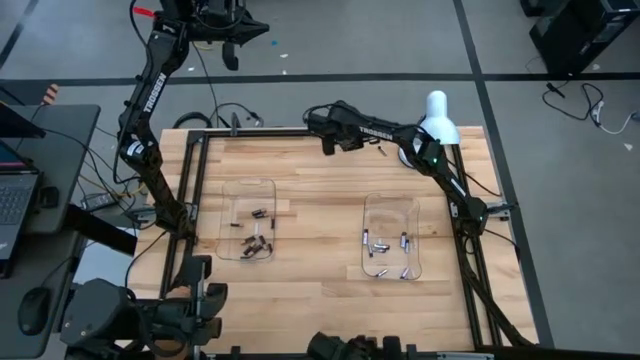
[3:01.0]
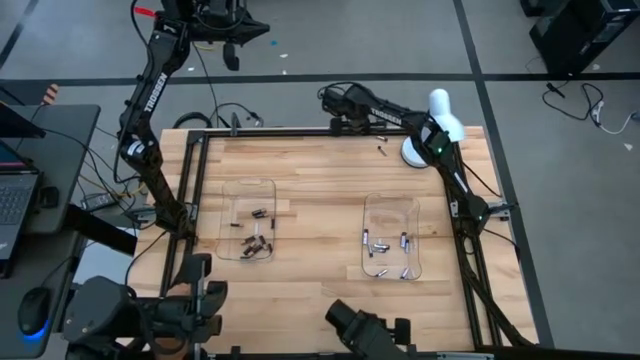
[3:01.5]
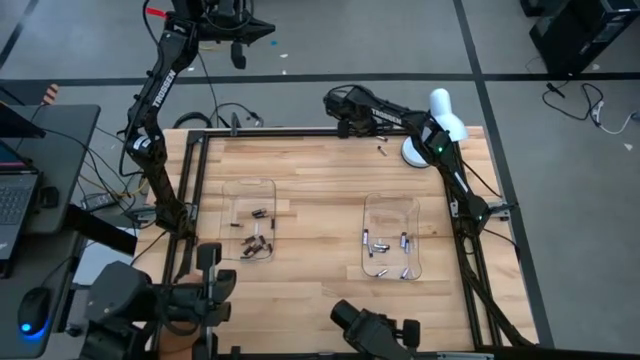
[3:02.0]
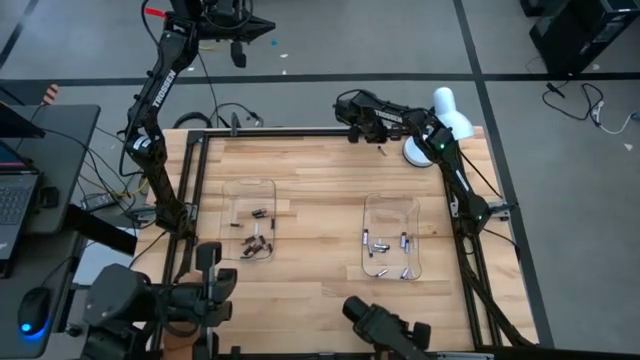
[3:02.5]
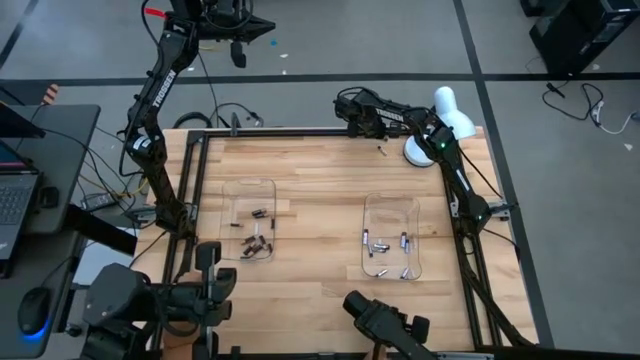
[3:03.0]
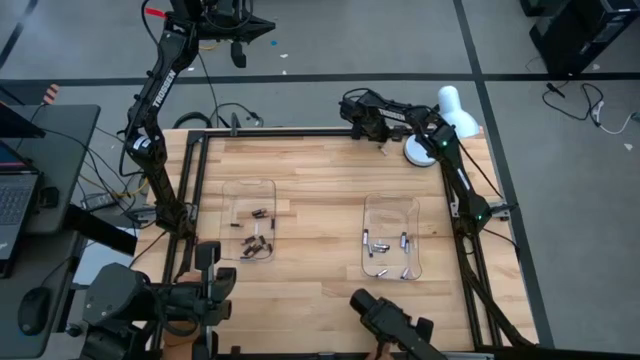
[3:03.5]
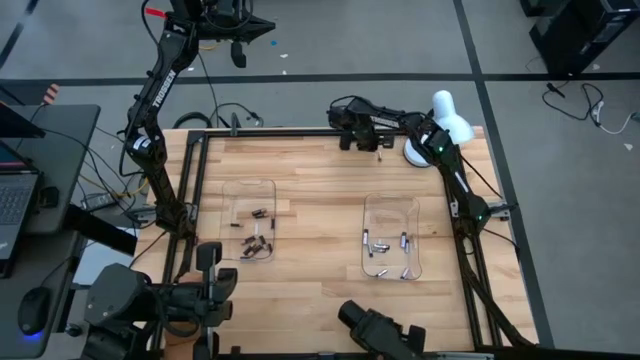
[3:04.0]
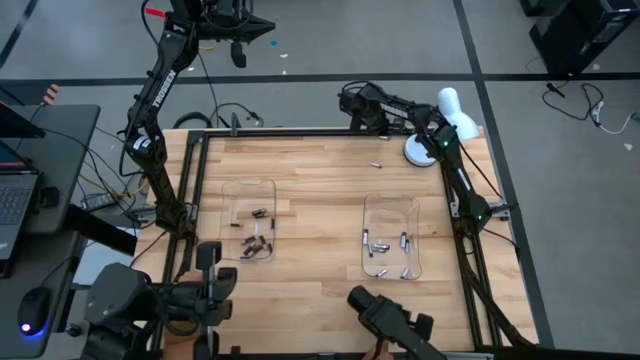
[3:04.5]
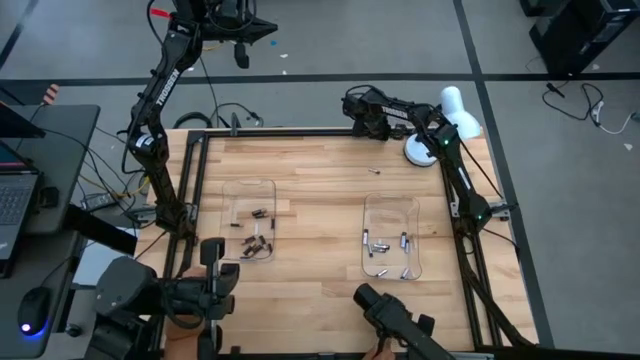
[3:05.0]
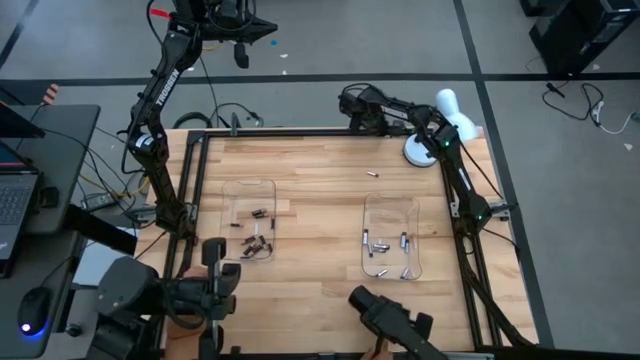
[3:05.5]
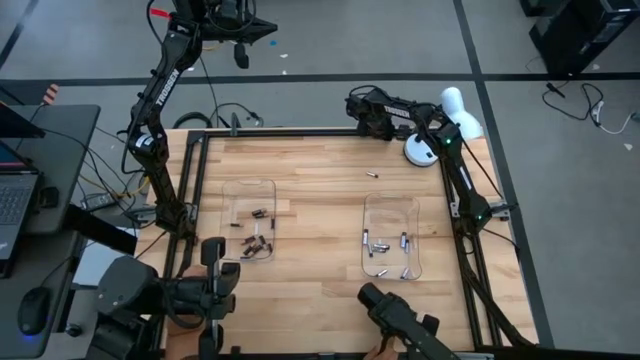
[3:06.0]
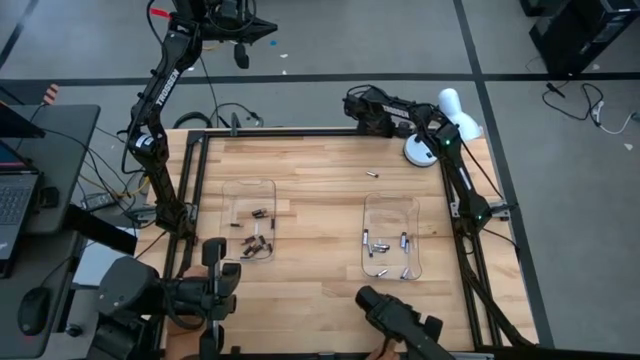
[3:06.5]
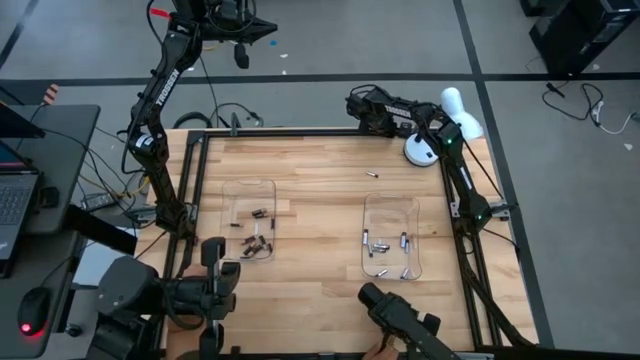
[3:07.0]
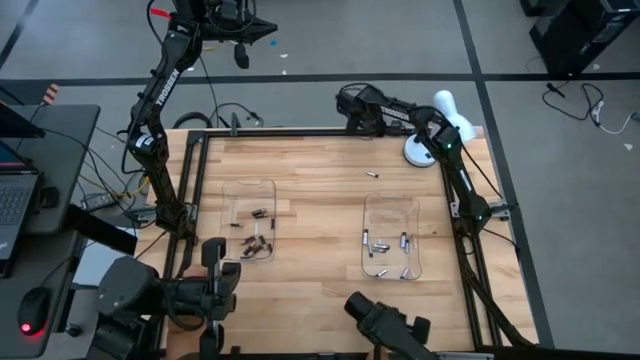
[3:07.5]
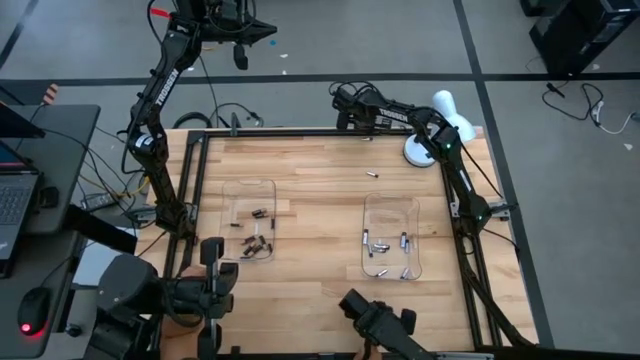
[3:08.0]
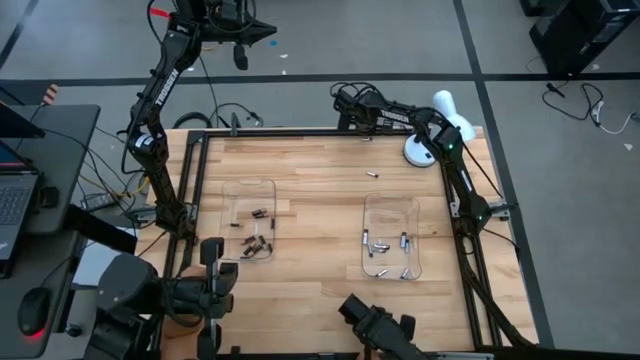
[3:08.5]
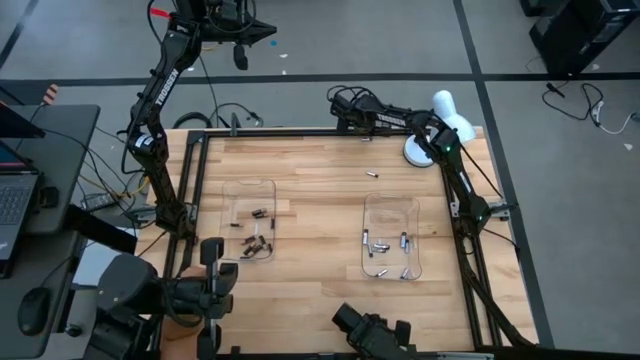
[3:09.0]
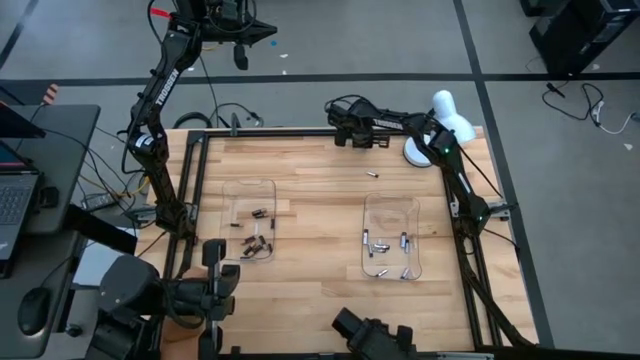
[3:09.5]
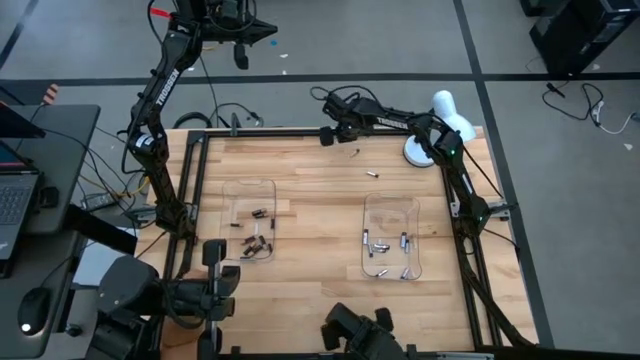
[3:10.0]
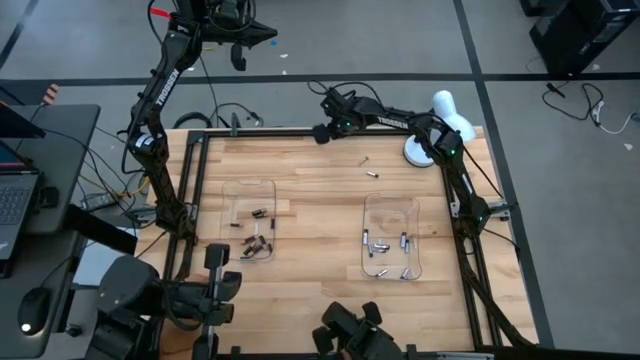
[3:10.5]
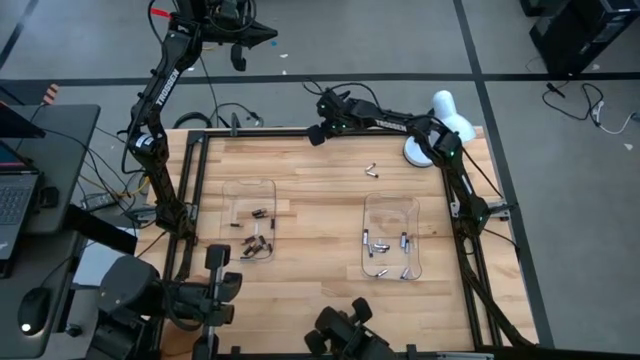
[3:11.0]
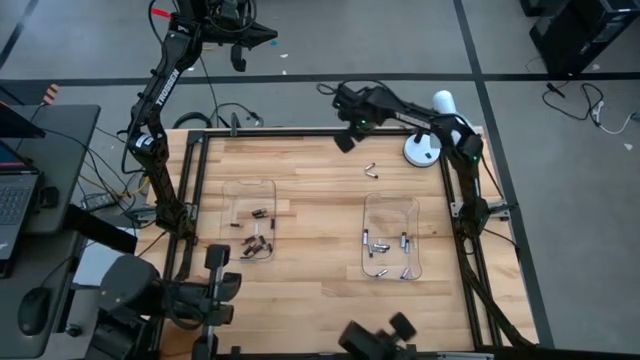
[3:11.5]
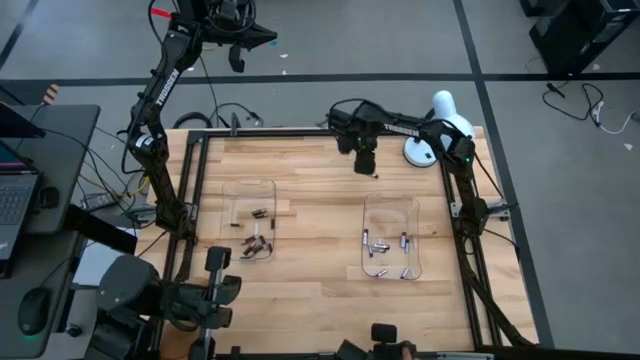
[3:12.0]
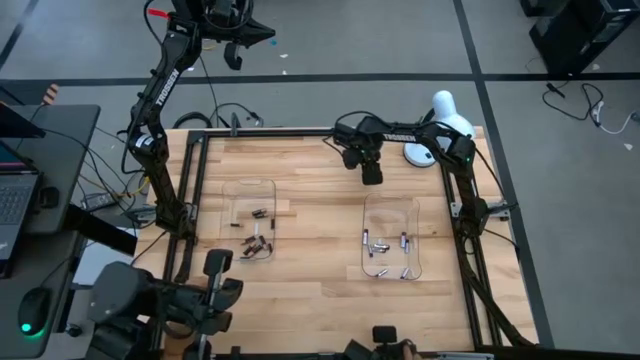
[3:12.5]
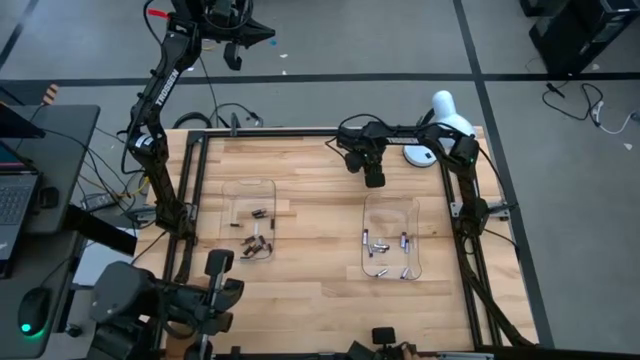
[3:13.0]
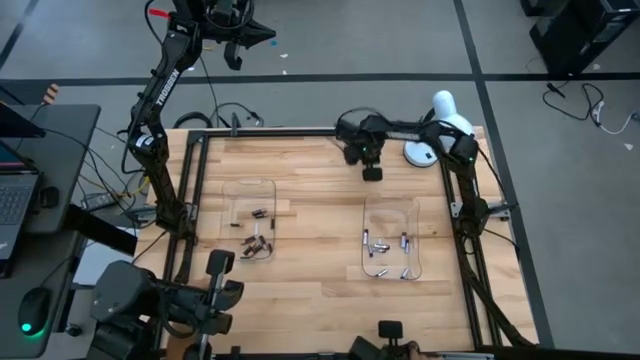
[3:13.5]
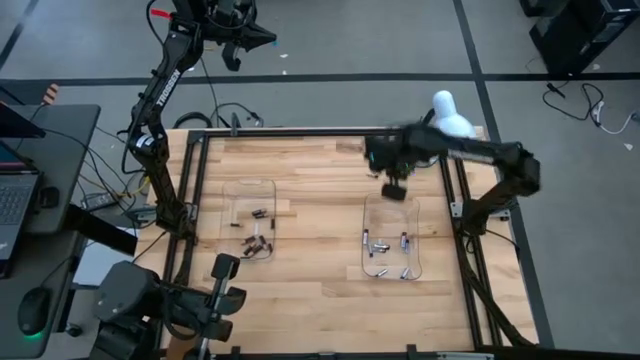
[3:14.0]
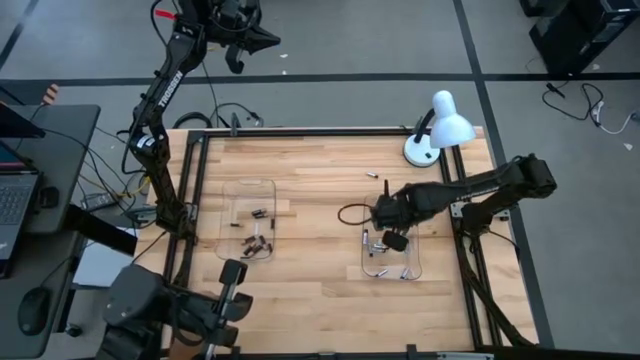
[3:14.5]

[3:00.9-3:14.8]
Task: Sort batteries
Put the silver battery into the right transparent bin

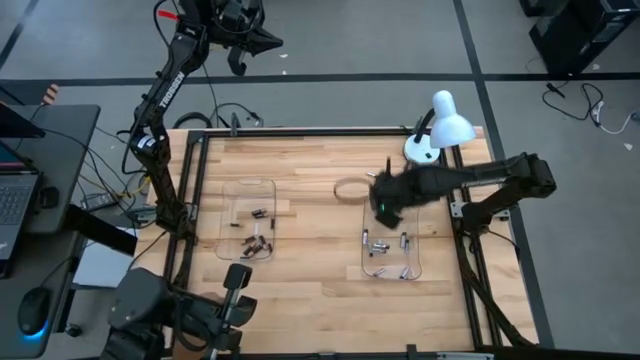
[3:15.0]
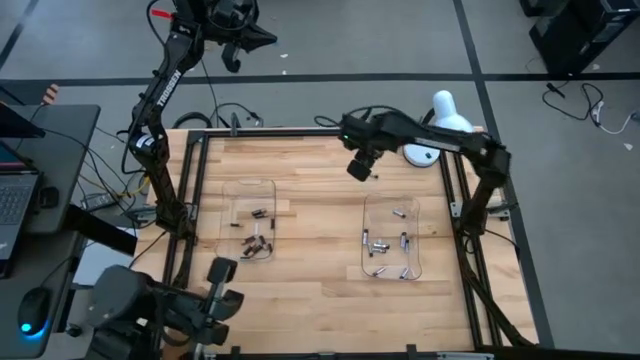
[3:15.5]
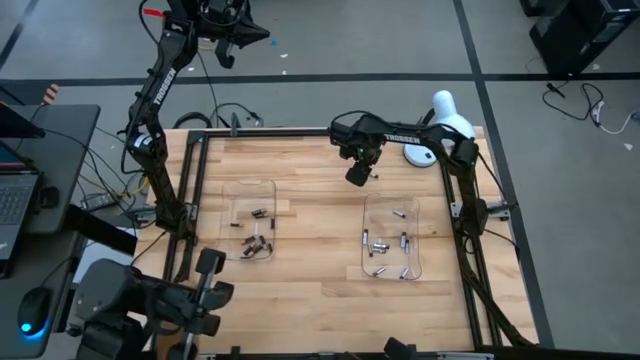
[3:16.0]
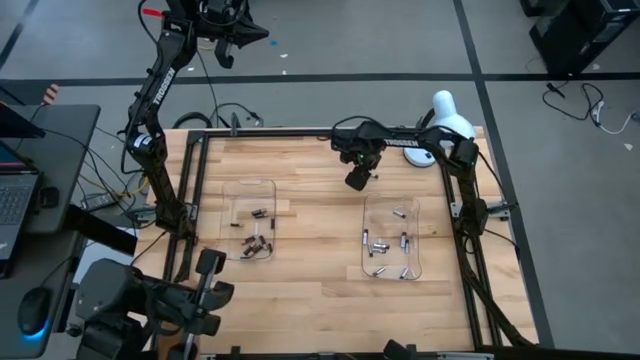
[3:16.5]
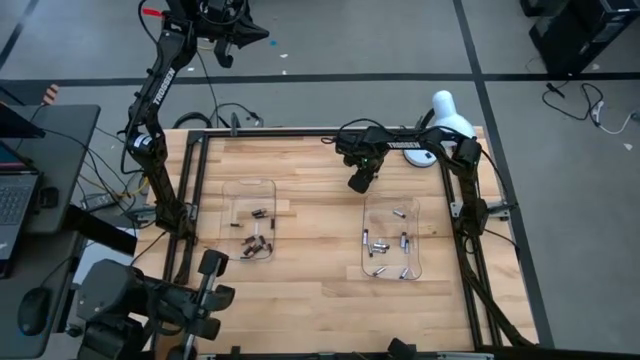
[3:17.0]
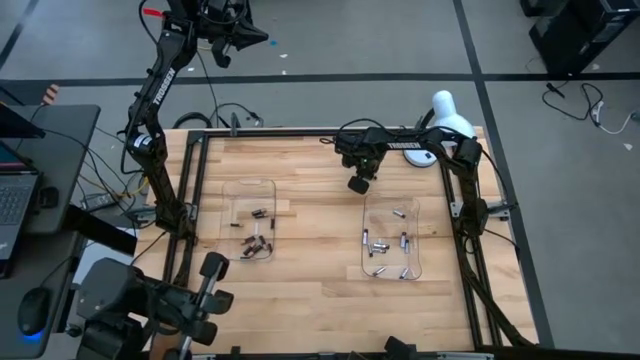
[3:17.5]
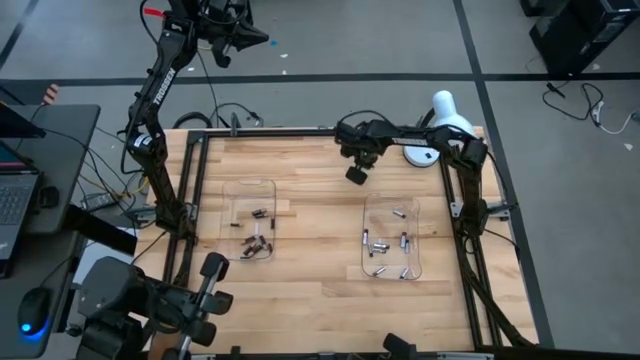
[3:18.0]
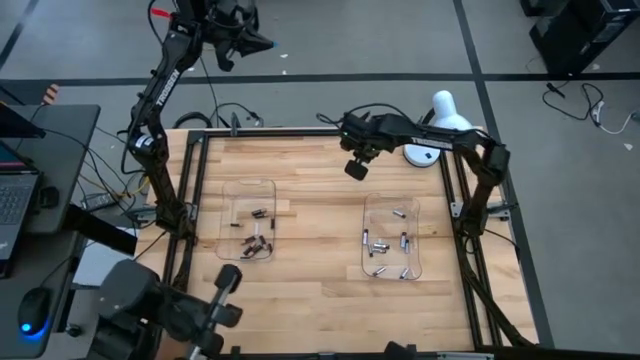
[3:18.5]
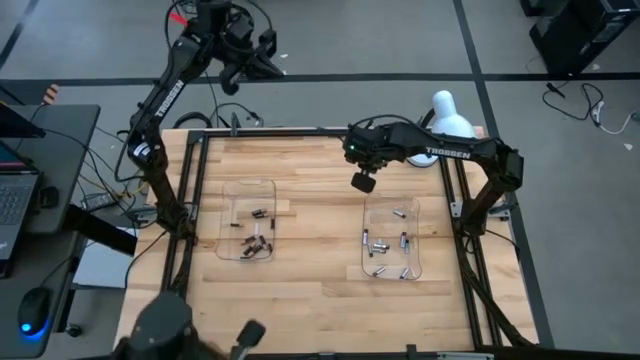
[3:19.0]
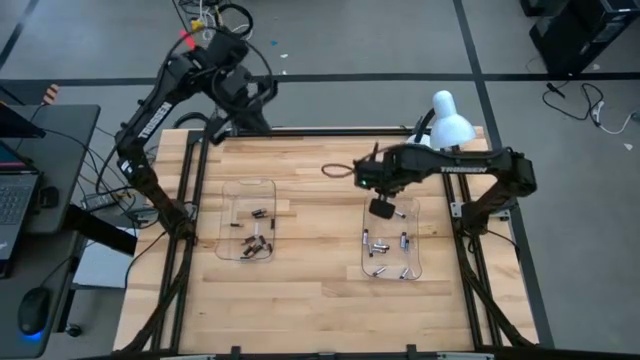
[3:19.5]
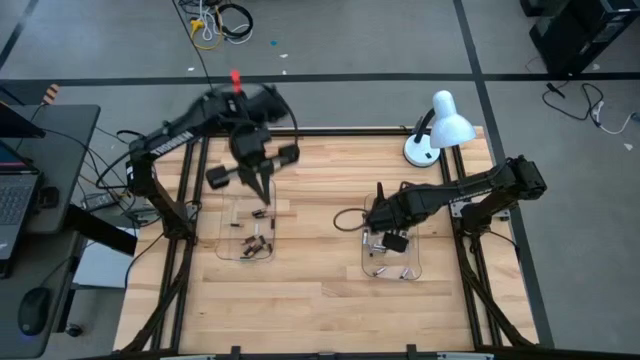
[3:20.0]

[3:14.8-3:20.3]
Put the silver battery into the right transparent bin

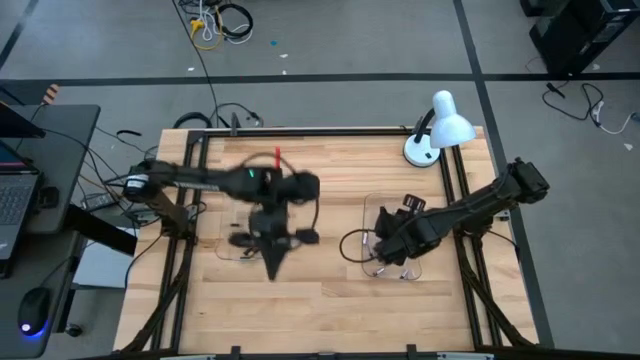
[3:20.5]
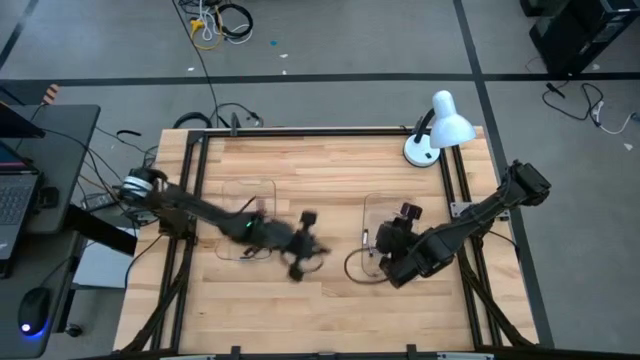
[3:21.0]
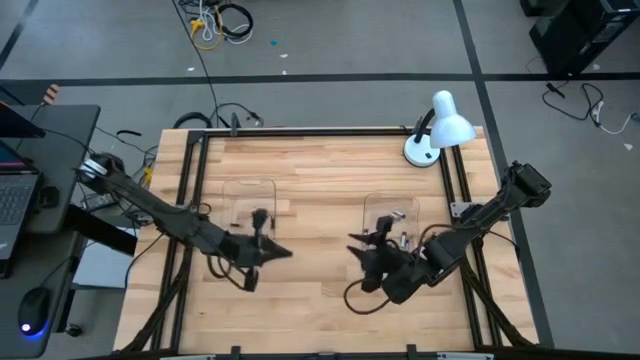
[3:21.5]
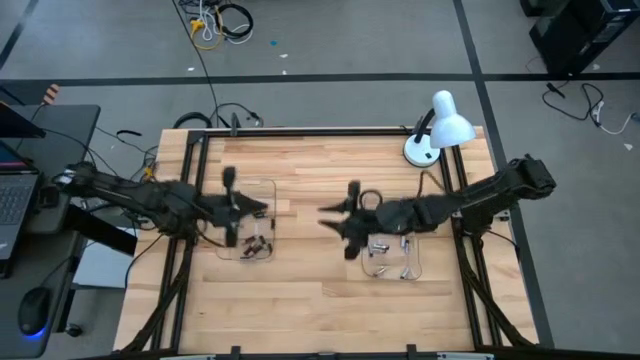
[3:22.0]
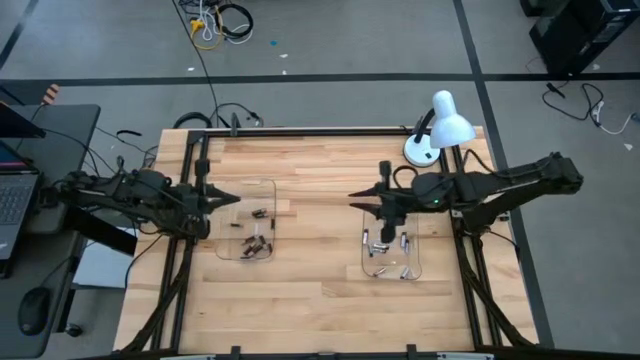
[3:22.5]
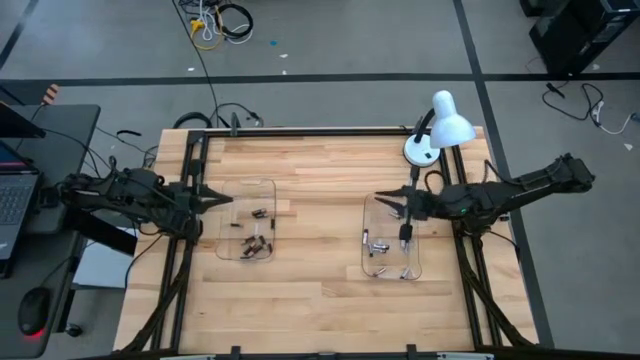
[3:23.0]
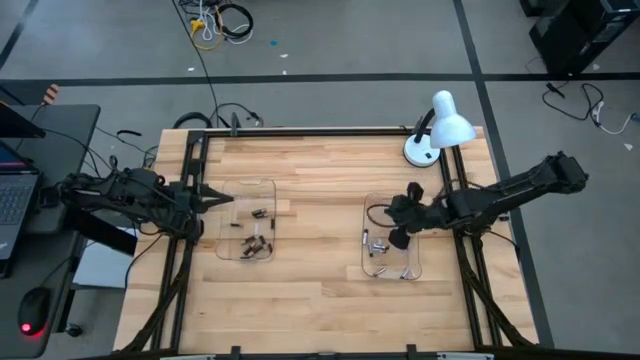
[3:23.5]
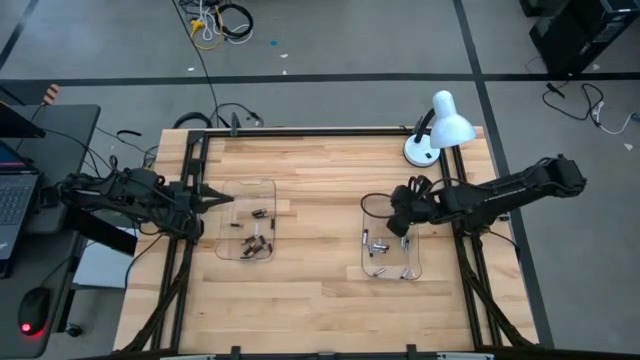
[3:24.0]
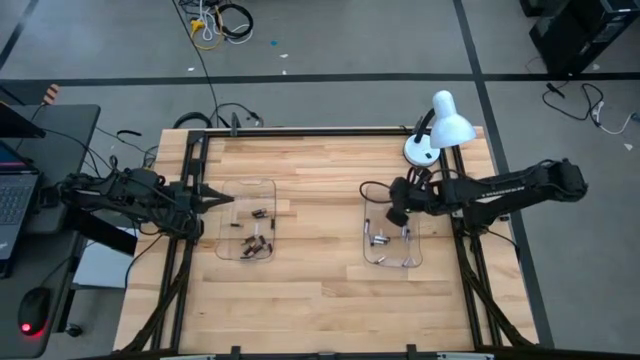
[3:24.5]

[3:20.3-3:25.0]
Adjust the right transparent bin
